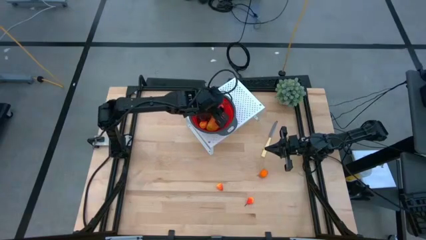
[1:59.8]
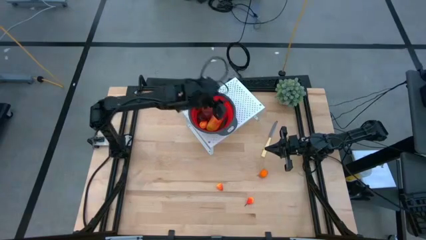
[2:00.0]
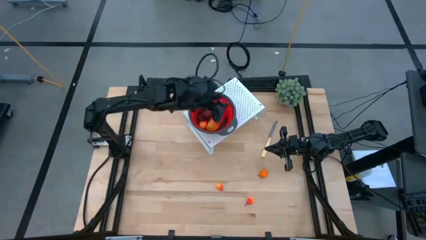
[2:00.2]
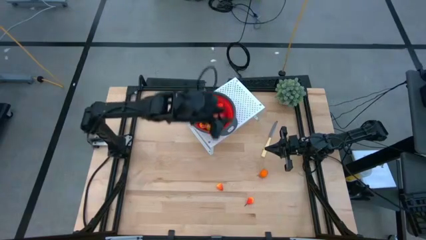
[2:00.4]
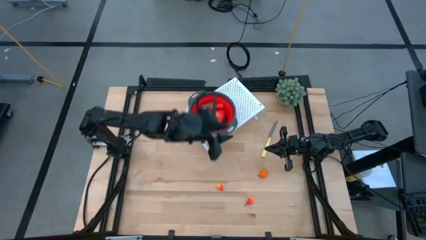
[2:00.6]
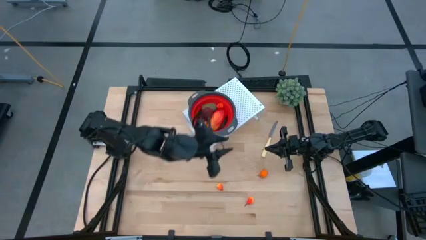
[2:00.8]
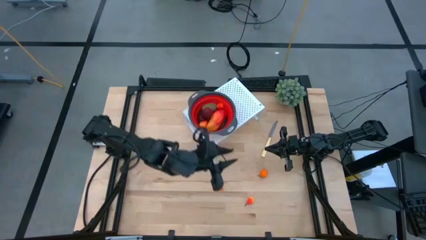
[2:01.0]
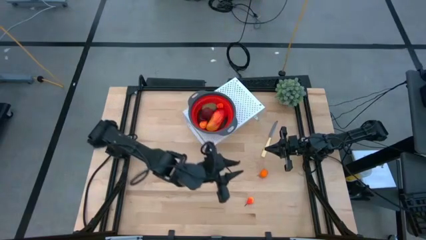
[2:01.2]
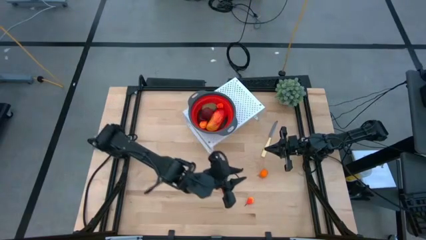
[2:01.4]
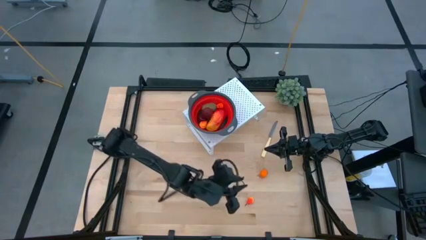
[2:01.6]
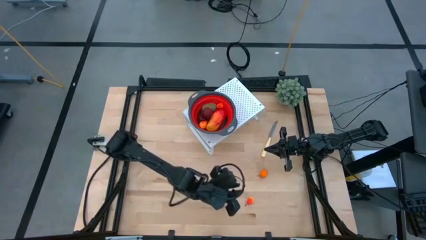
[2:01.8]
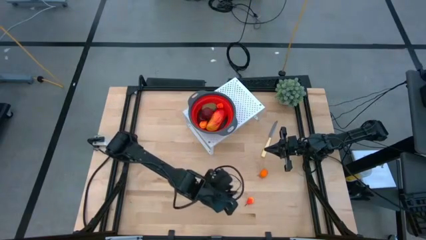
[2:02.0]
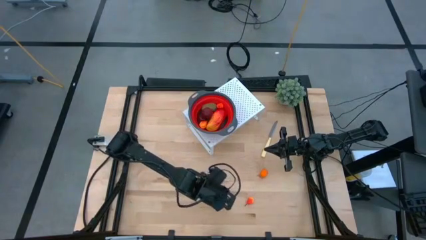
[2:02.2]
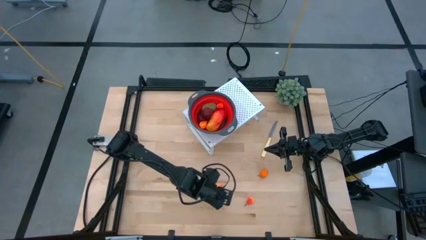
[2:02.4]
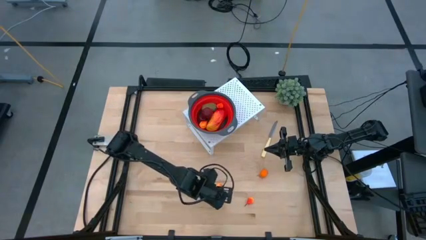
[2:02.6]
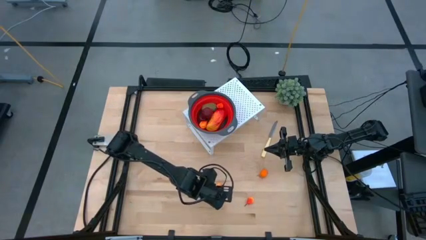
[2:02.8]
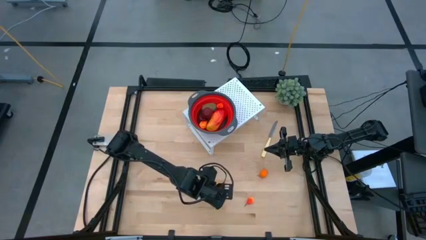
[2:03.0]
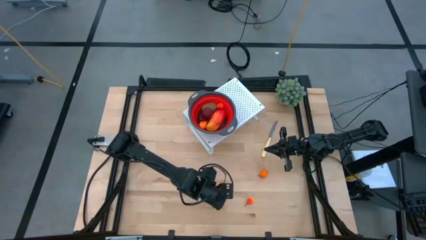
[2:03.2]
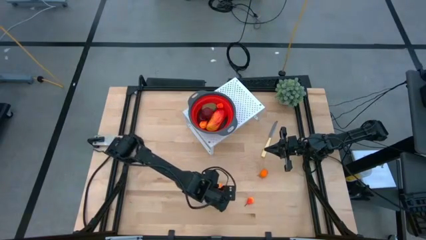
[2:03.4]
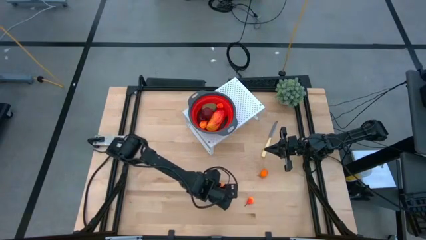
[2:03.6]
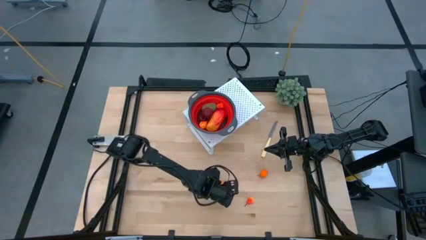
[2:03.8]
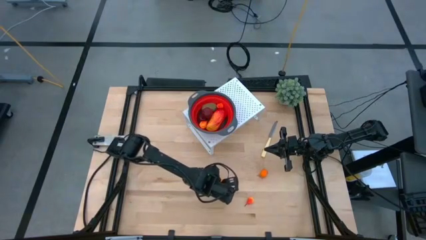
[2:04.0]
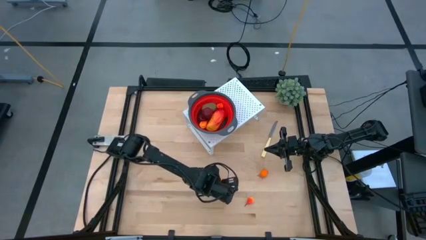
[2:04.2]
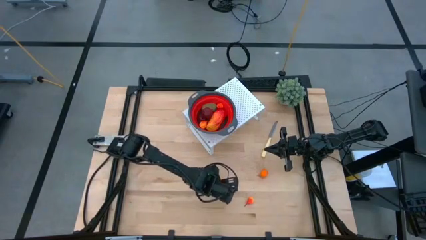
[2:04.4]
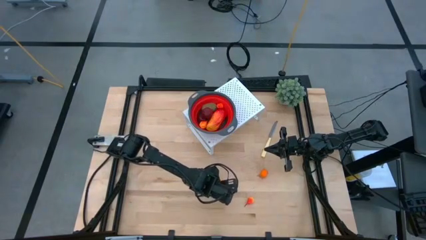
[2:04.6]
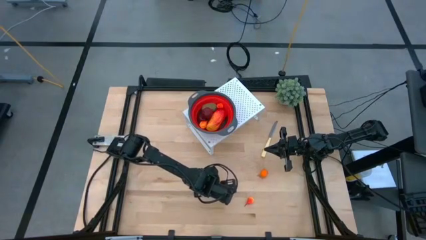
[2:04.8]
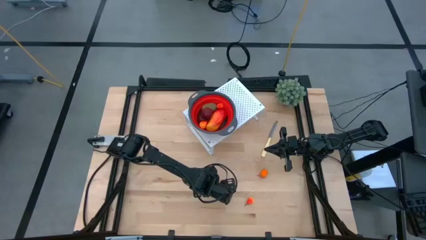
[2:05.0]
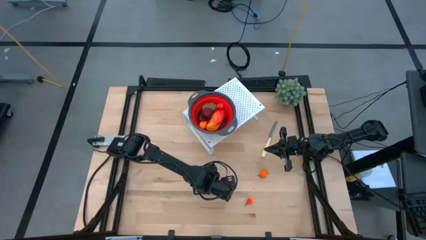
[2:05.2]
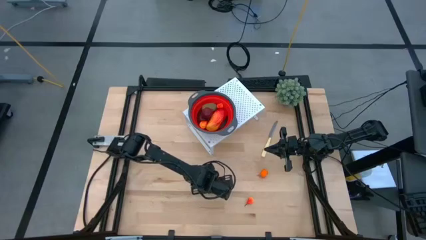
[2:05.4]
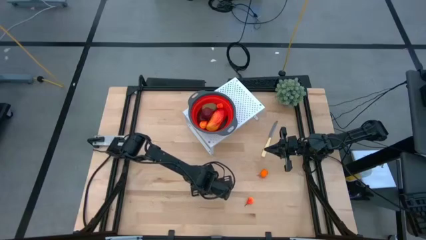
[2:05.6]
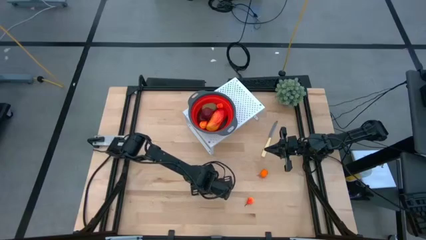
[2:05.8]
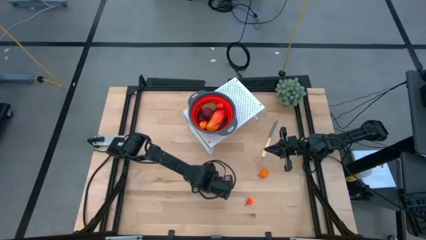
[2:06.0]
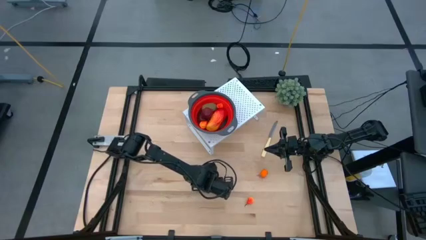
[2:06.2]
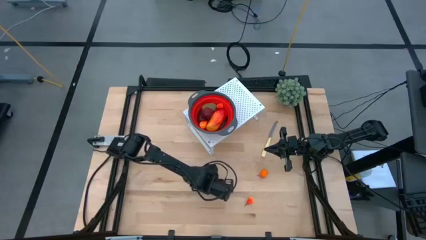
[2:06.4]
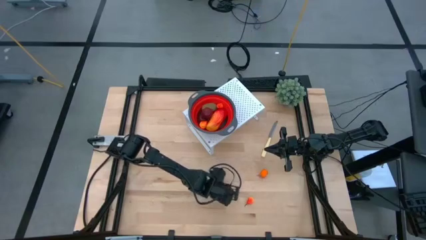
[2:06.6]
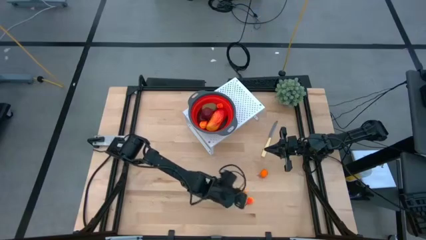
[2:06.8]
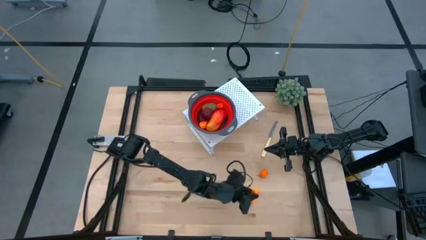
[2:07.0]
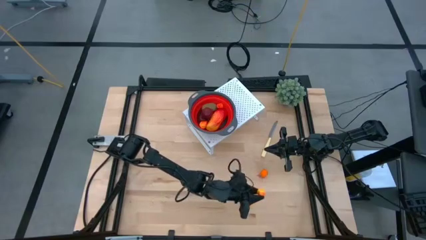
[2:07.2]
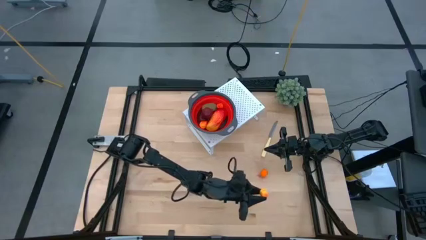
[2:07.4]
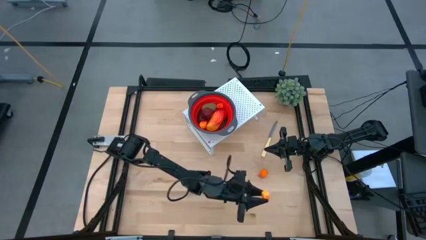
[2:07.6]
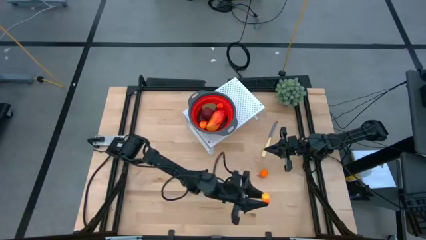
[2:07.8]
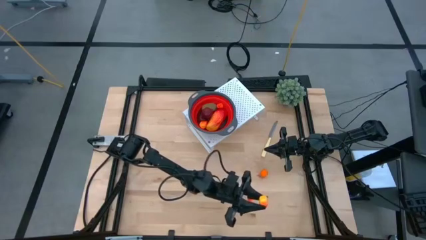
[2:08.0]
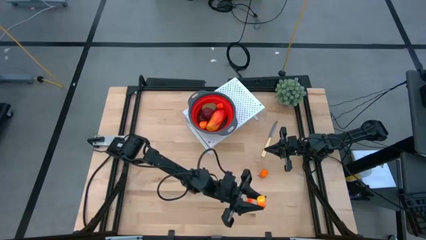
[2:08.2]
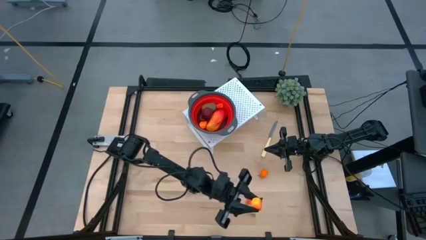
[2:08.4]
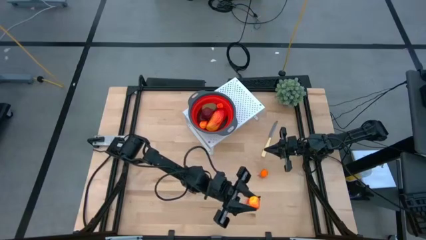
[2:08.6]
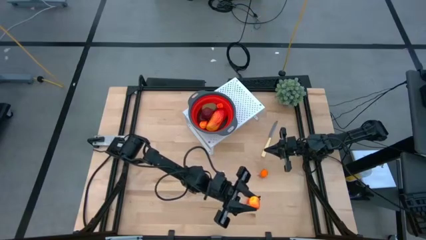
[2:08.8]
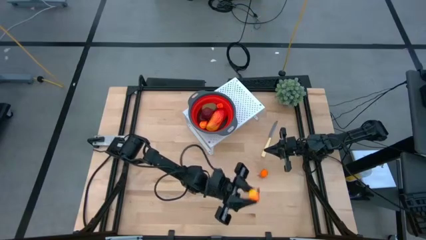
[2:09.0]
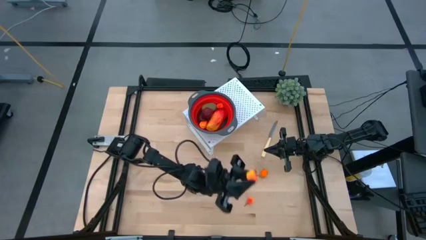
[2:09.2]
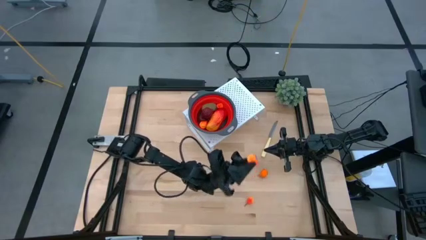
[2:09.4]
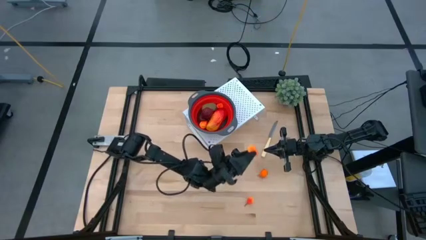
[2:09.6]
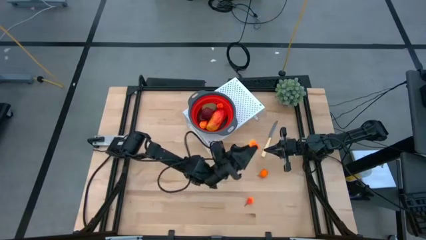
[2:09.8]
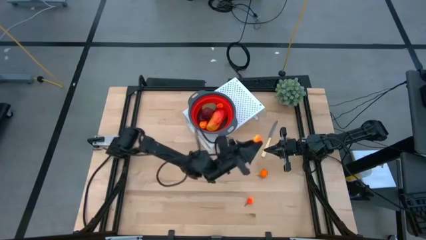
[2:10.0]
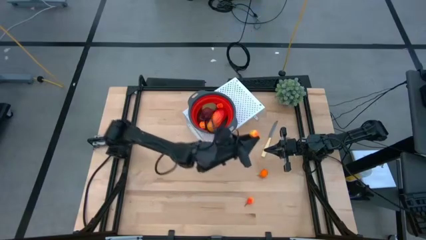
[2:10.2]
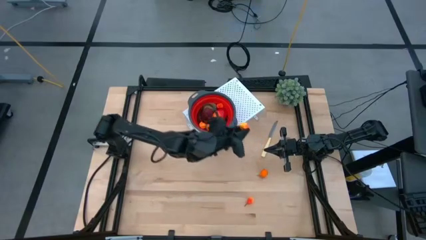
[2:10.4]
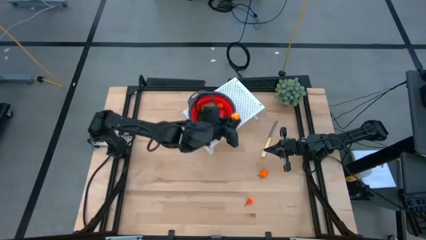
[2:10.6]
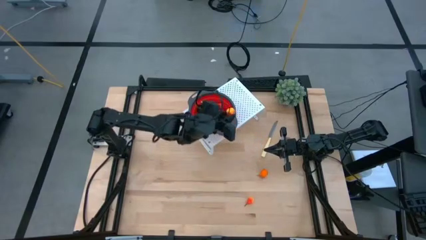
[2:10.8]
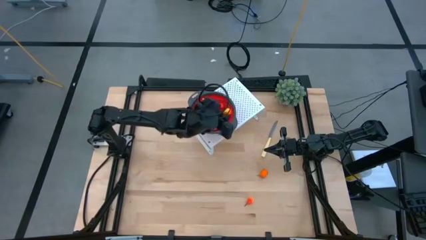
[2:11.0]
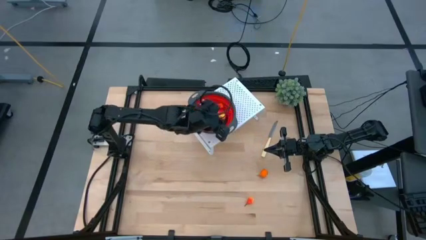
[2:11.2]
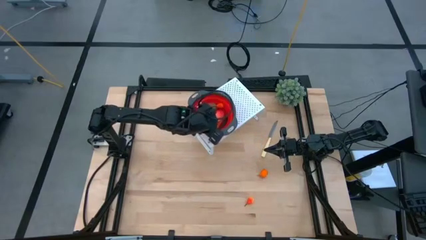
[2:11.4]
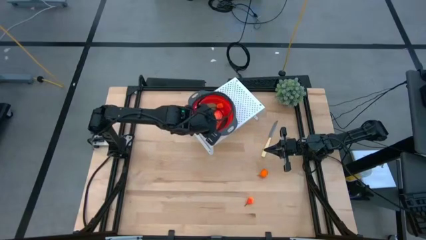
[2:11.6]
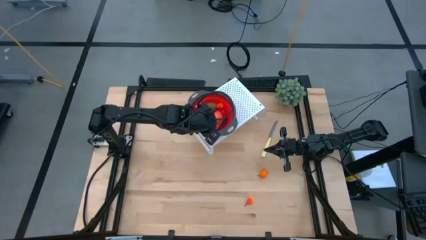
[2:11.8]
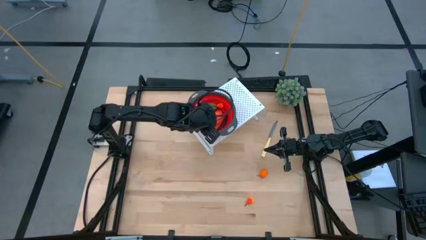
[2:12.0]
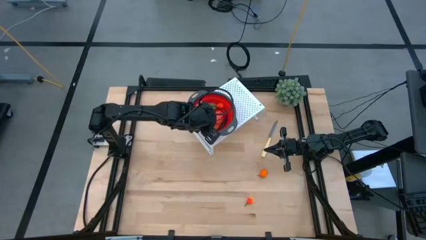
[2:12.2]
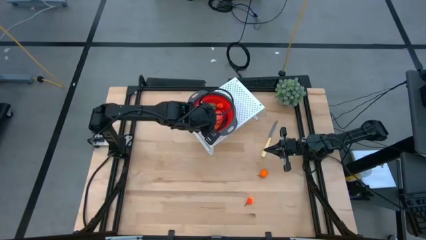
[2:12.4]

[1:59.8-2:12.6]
Task: Pick & Place Fruit
Put the peach into the red strainer bowl on the shelf

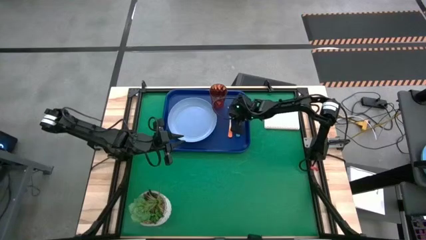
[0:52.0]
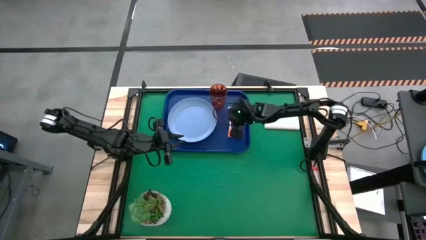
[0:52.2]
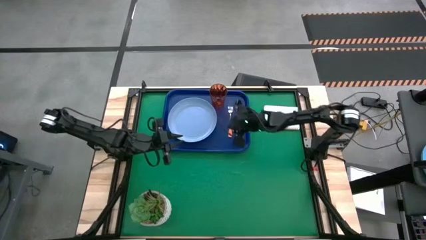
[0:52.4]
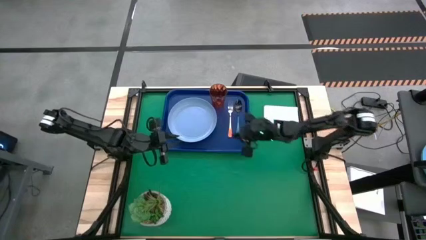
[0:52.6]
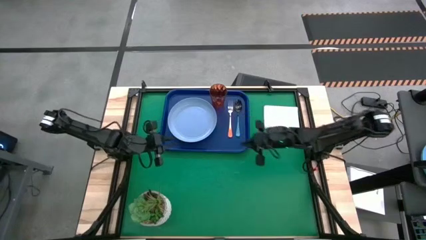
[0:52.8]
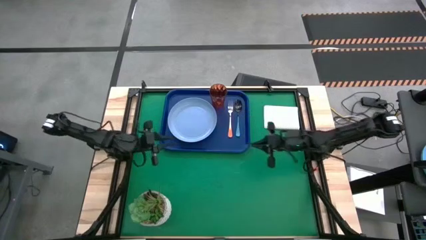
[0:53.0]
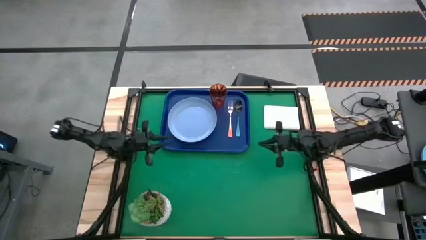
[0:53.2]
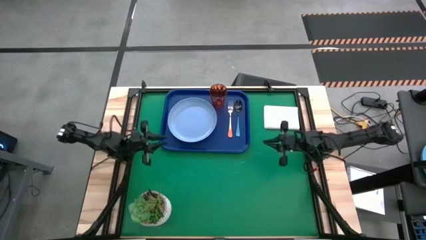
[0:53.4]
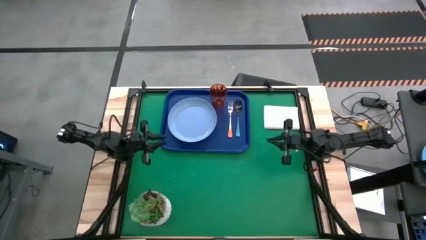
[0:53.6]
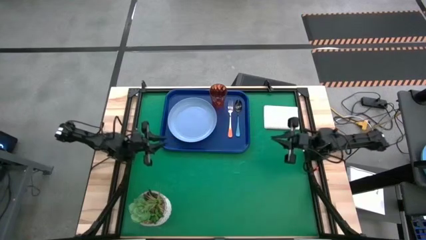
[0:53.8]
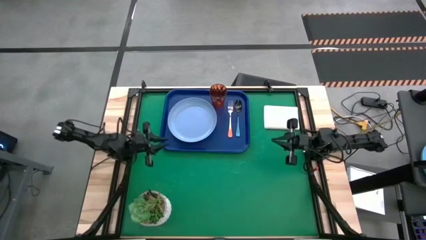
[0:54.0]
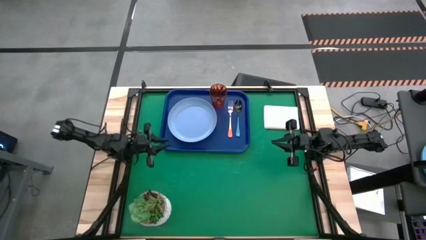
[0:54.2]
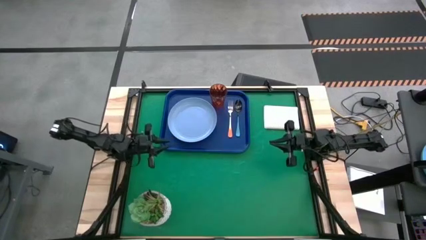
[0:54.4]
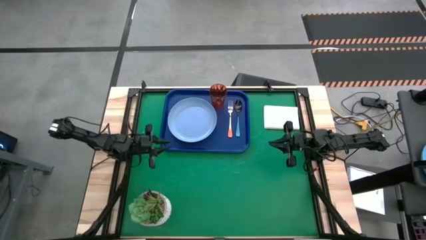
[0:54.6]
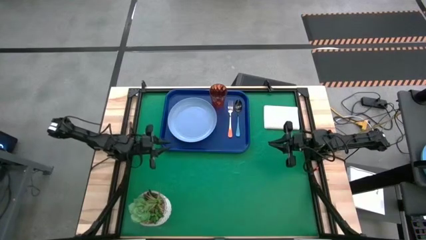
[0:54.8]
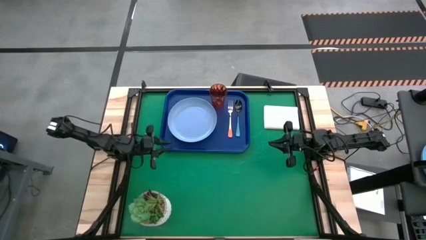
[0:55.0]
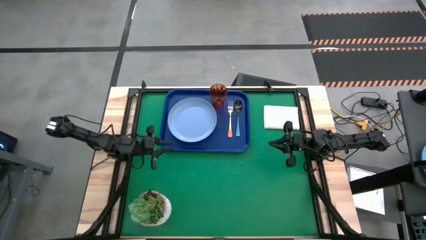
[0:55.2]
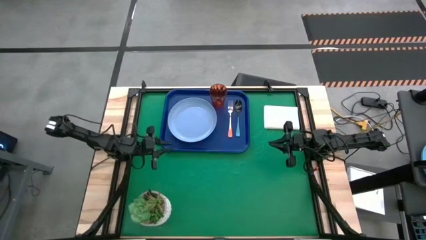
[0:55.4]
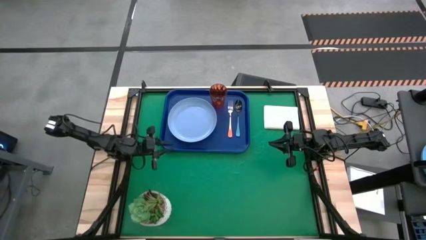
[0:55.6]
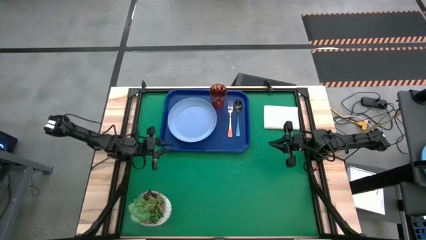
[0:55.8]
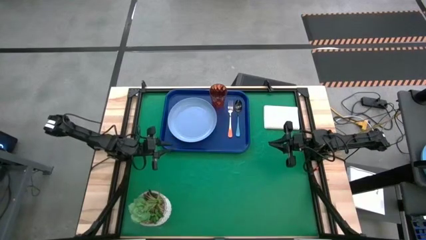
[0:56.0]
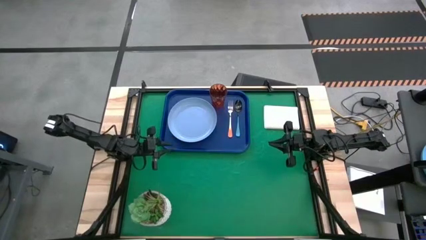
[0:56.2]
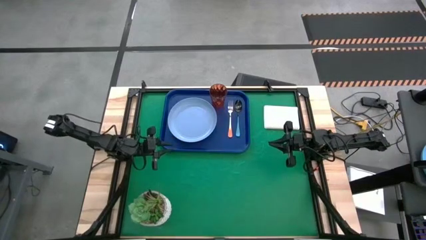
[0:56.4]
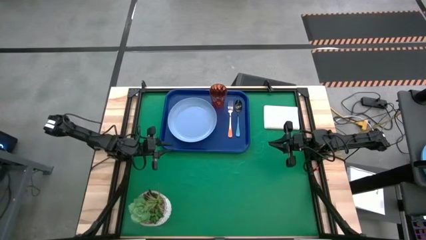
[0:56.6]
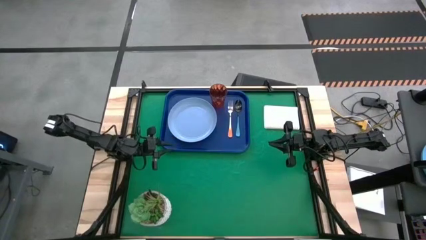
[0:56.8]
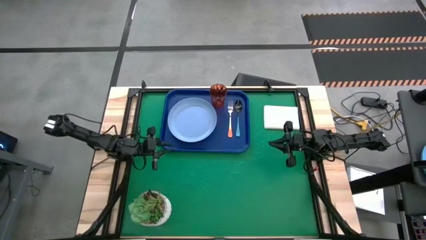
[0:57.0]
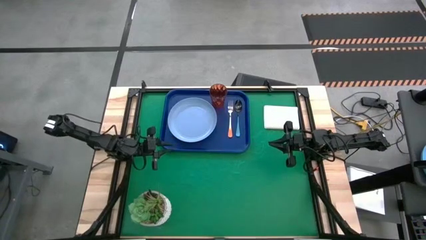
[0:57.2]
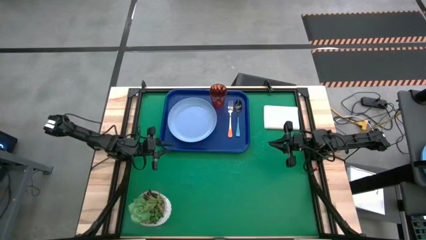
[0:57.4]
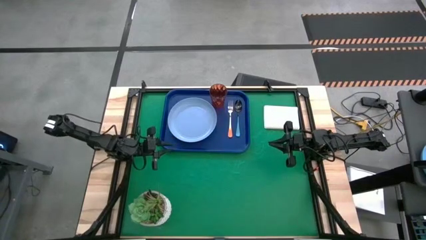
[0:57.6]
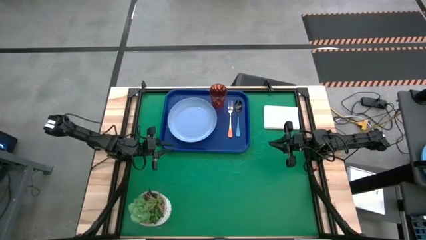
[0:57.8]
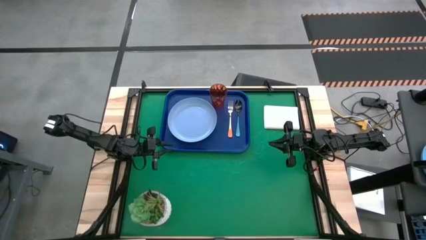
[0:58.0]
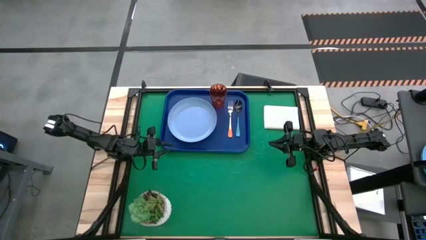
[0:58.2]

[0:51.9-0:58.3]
Task: Pick and place plate/cup/fork/spoon on tray
Return to Home Position
